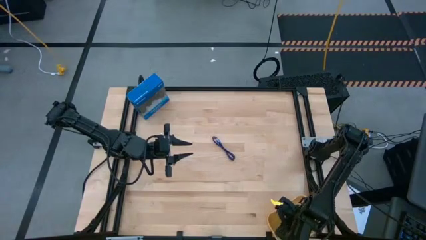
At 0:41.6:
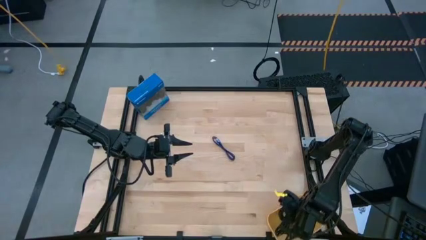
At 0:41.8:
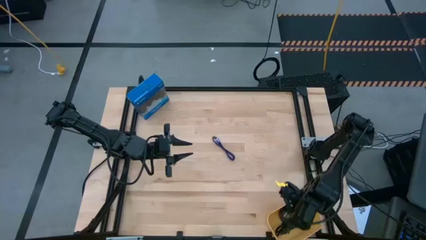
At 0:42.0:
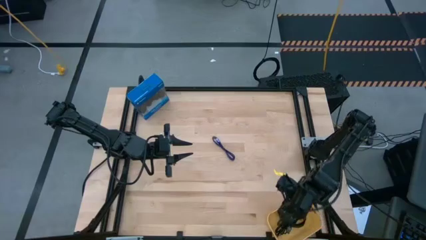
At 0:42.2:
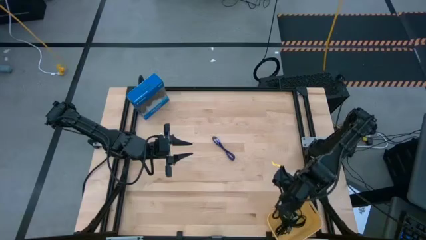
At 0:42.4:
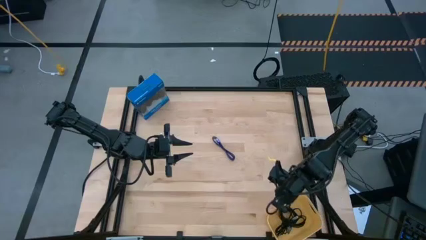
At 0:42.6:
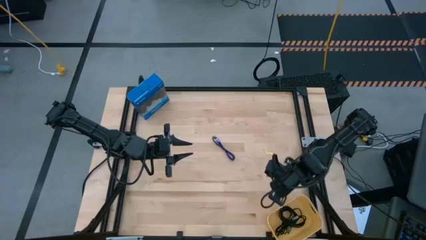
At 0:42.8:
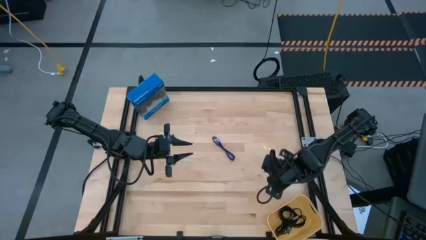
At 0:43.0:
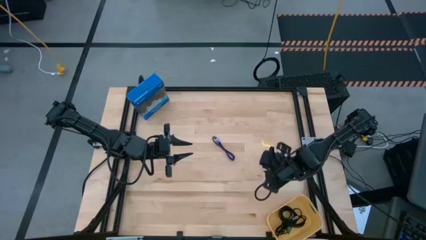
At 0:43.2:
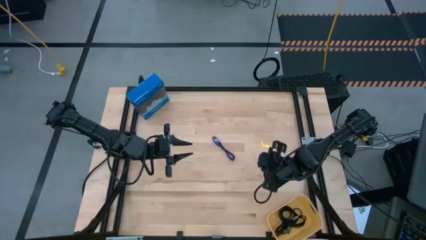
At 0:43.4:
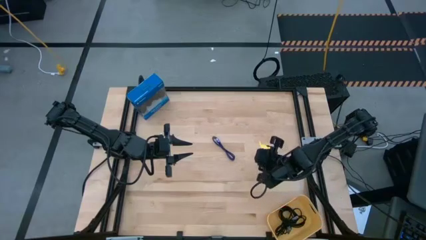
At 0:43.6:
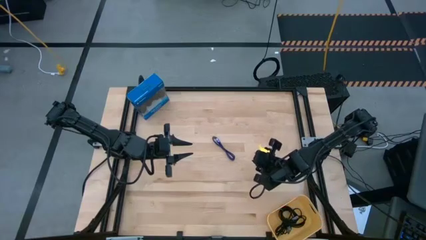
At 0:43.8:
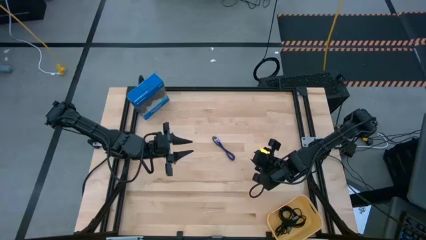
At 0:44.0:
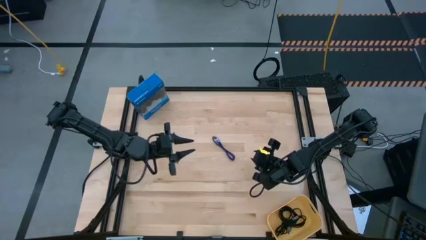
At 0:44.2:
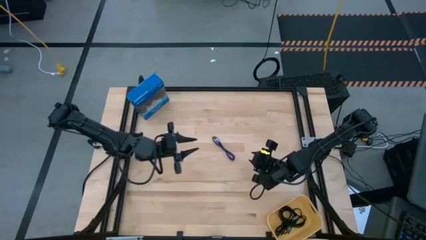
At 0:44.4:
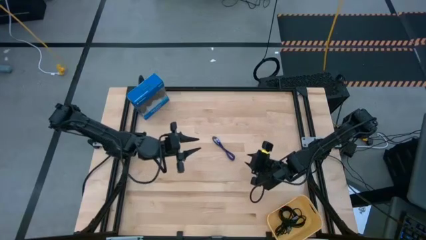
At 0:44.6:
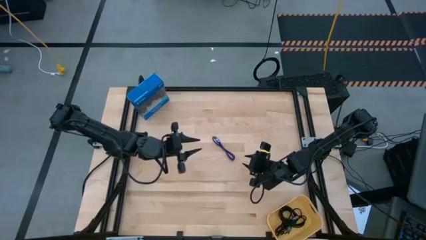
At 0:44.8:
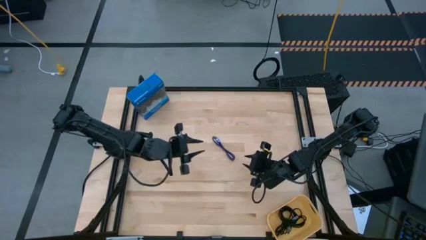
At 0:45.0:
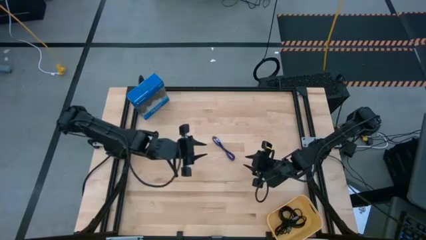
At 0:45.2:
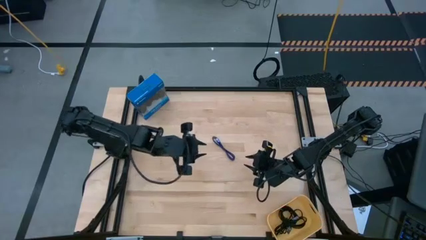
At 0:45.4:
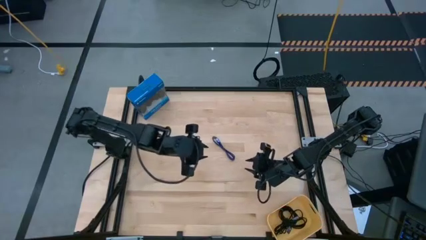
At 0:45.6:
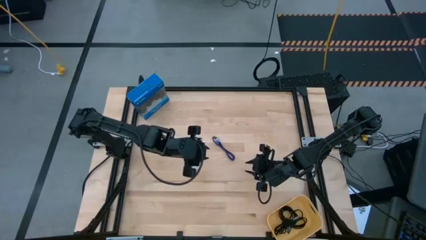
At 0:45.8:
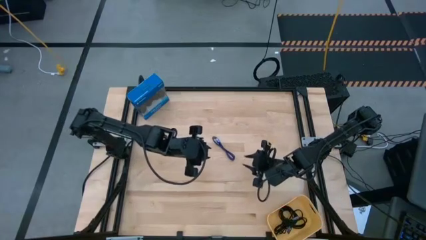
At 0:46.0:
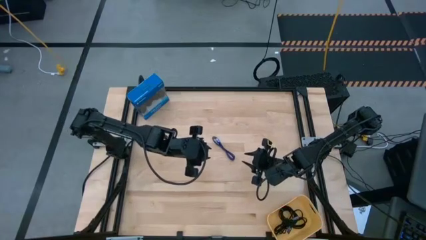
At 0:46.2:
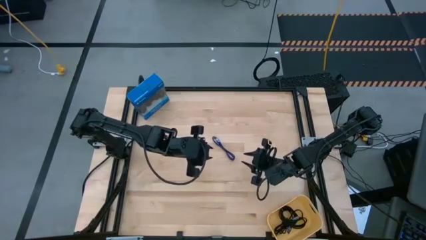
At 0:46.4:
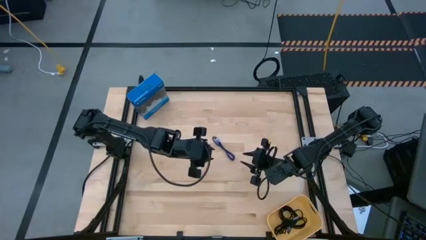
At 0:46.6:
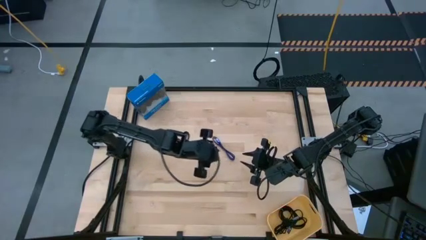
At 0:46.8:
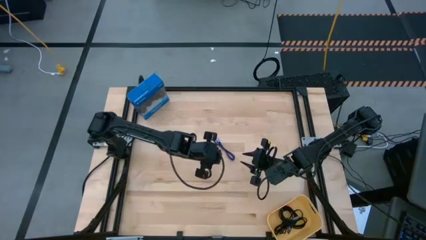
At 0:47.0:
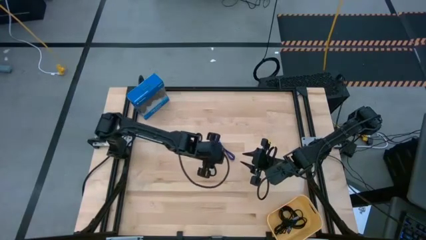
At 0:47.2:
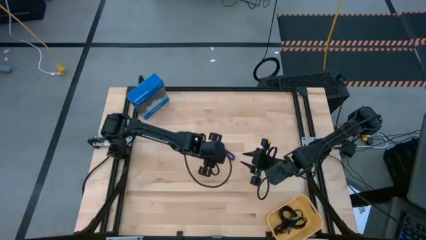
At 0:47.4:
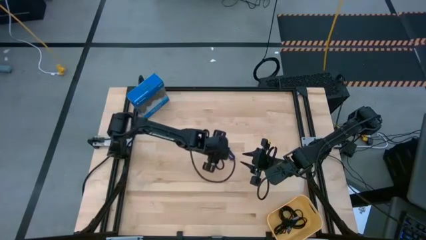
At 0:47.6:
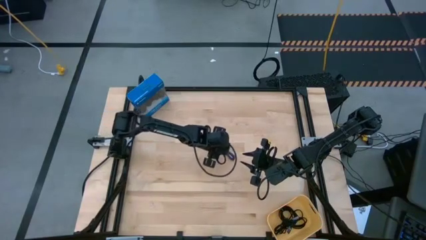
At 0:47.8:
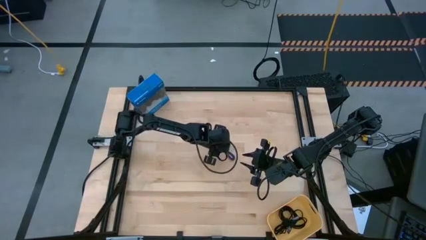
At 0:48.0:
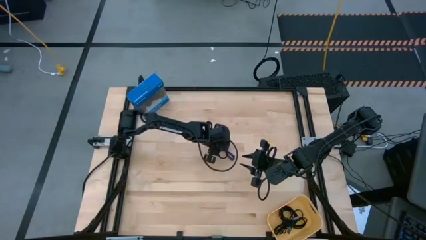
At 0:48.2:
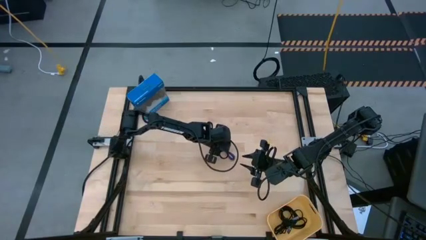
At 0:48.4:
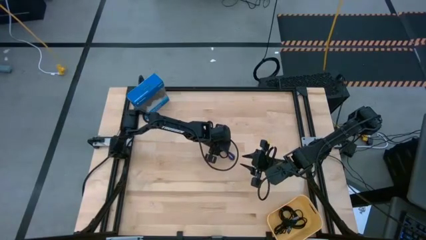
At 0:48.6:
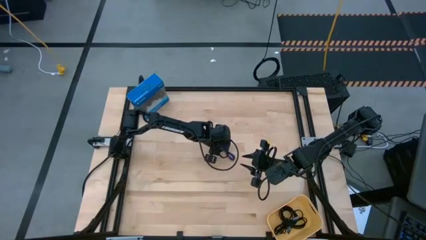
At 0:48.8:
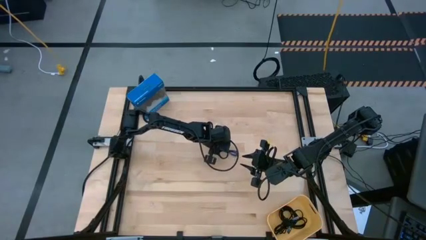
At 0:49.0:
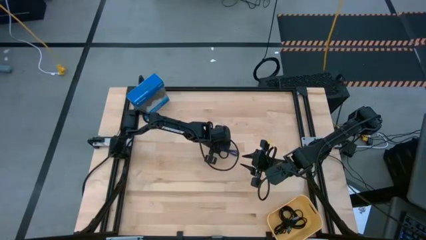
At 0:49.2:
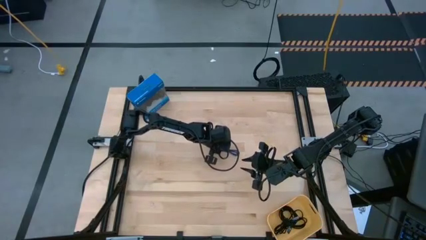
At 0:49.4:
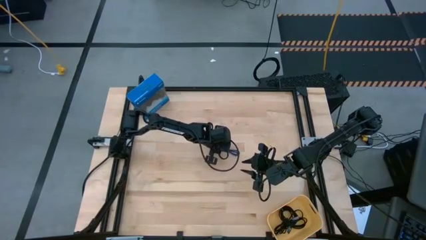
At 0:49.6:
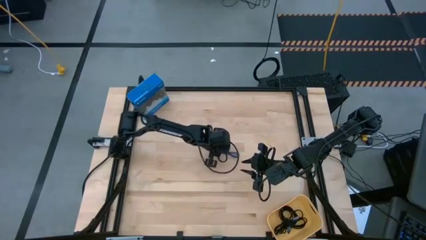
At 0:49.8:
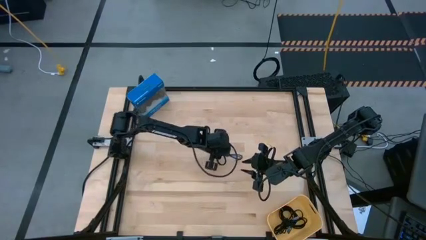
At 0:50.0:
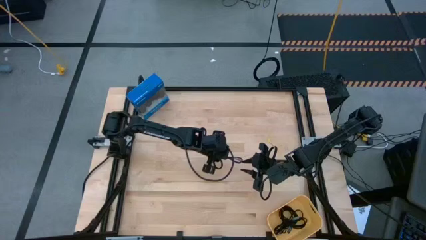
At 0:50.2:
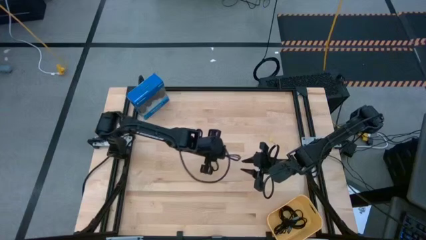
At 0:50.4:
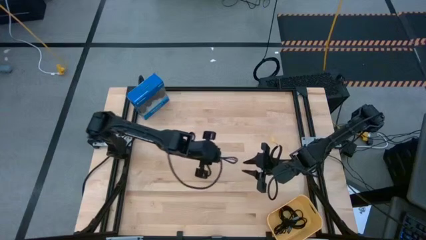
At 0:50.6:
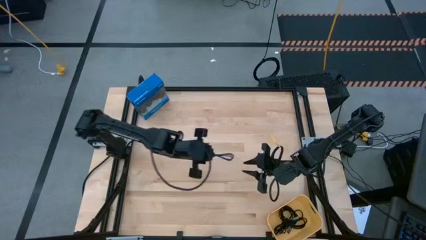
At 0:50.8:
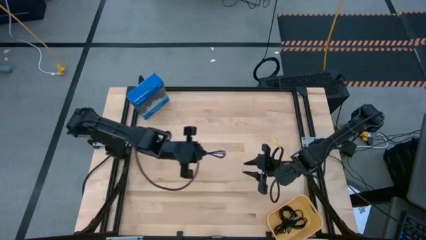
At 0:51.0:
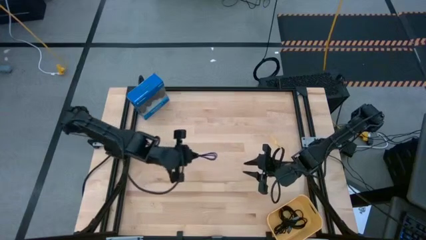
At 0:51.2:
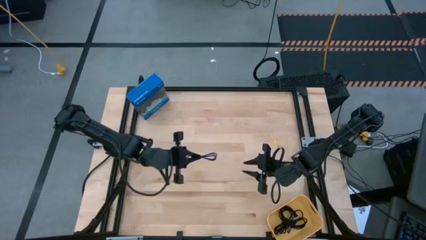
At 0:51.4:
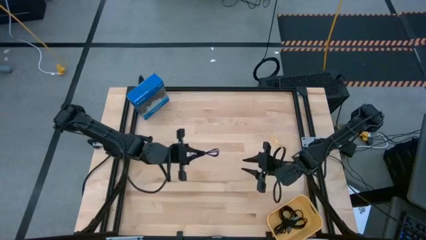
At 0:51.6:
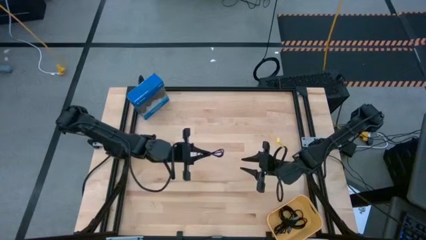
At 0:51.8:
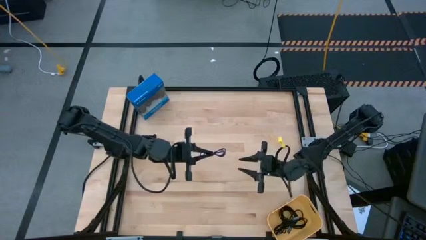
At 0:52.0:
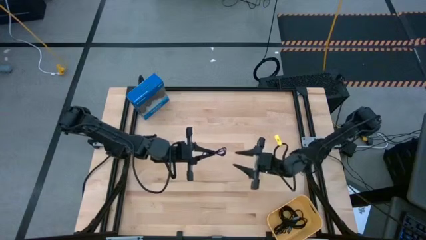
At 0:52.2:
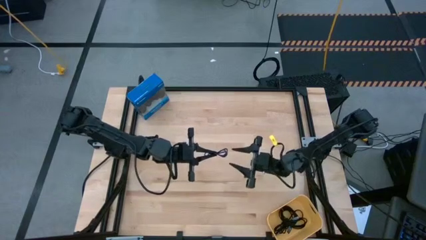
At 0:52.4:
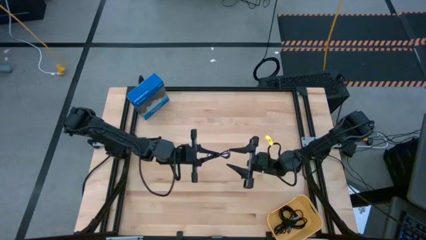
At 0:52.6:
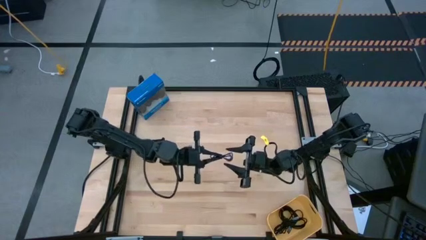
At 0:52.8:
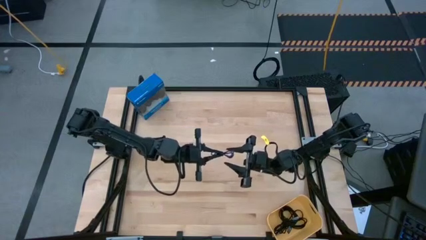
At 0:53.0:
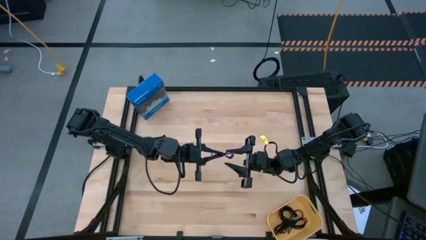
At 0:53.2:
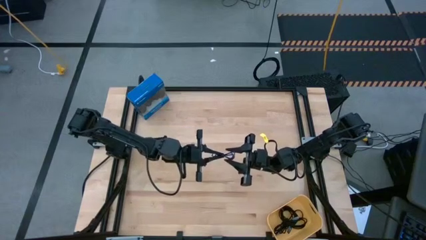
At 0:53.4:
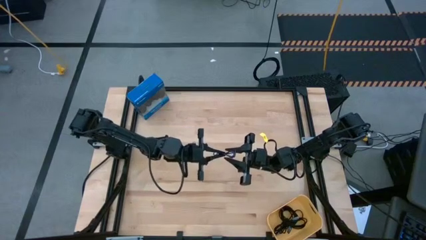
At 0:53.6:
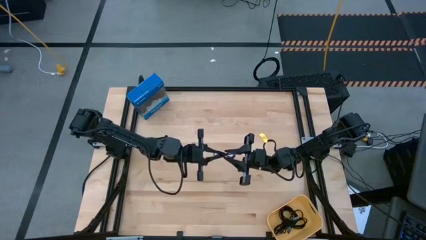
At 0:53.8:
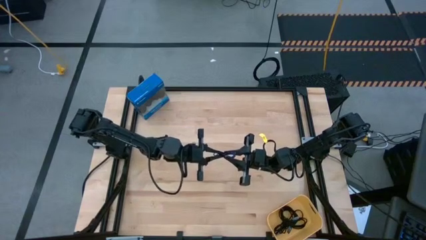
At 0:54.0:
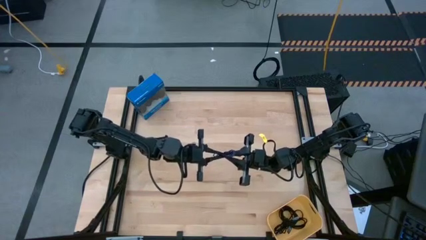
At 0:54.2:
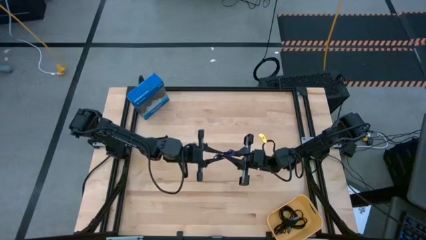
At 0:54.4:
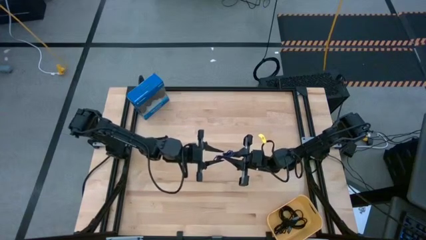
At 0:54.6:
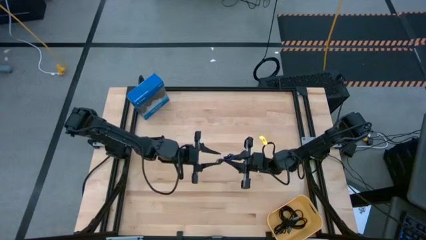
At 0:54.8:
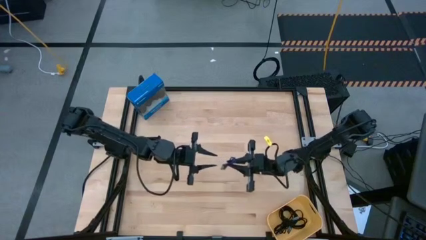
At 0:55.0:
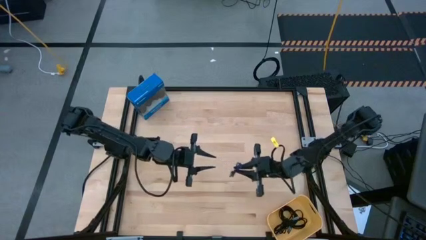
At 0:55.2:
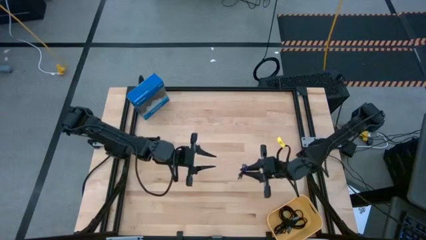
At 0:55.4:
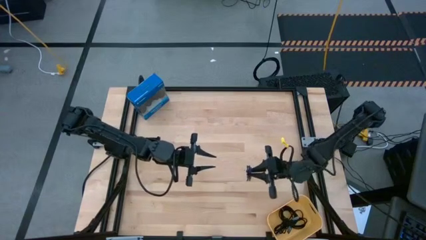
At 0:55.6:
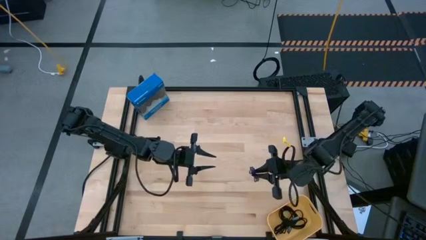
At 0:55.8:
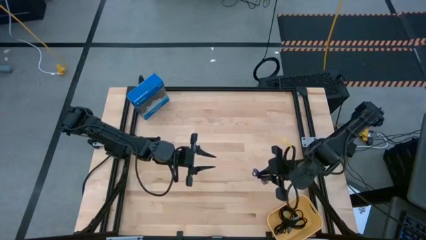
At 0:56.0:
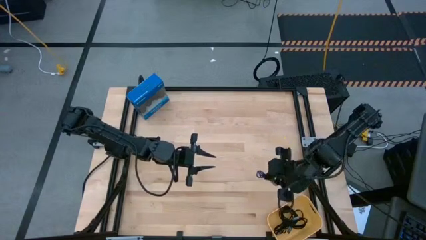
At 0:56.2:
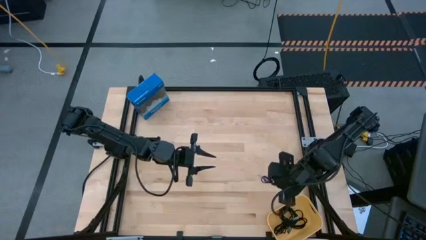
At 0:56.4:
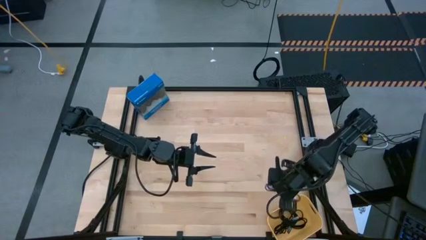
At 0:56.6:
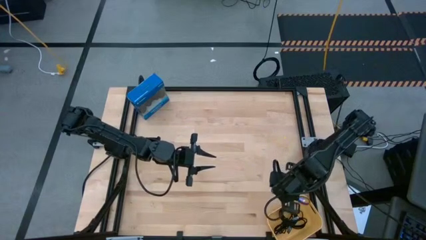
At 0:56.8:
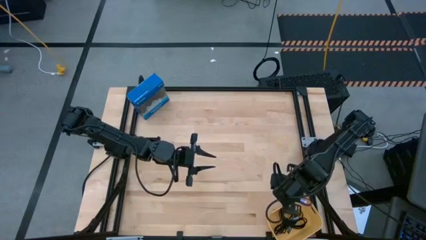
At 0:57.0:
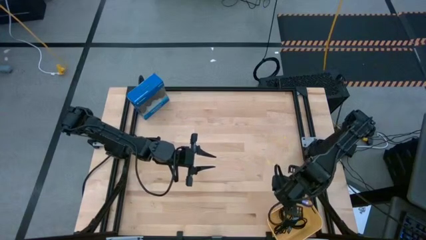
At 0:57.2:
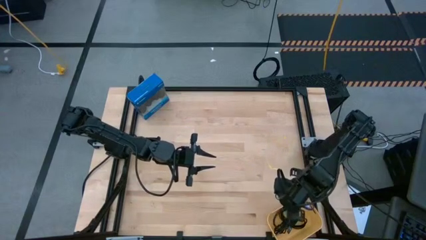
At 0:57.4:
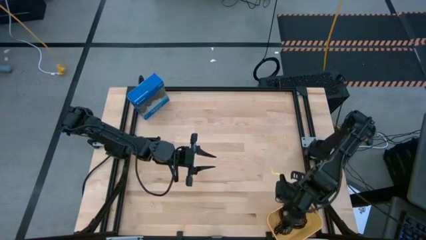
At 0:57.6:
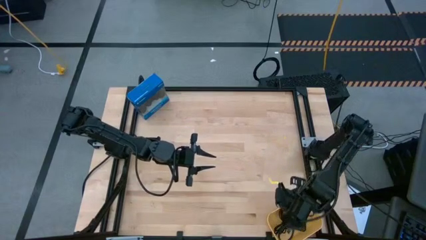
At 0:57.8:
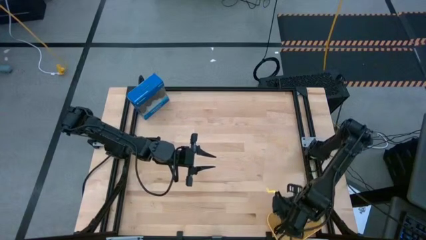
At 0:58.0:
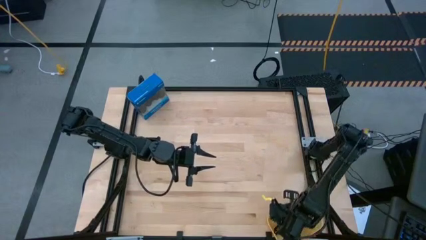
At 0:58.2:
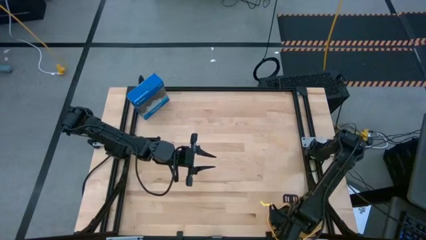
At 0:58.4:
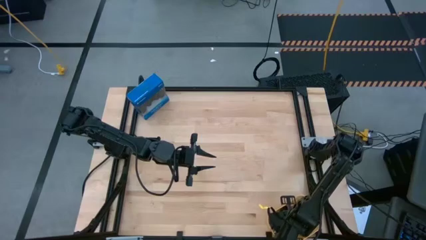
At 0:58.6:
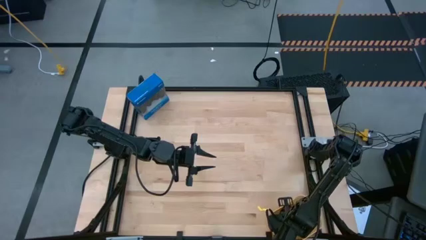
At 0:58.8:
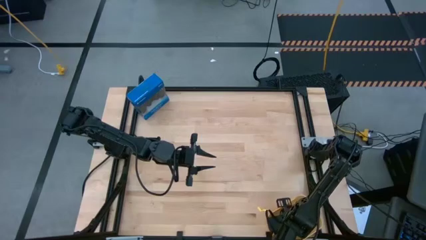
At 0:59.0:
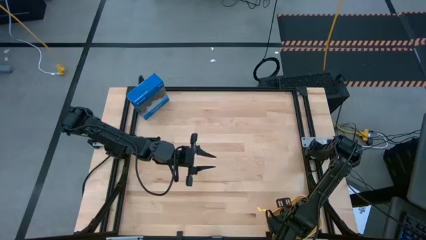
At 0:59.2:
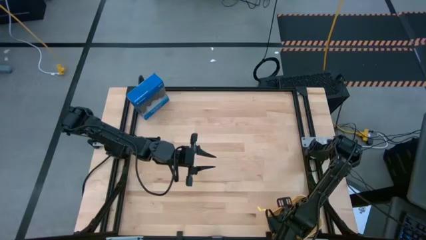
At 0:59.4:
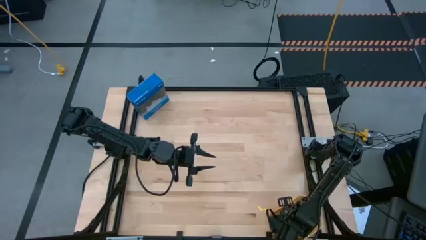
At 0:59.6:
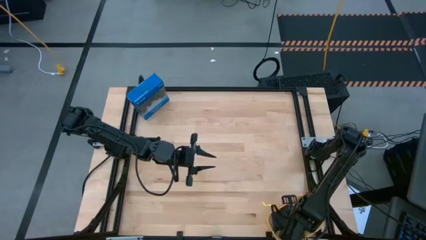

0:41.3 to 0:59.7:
Task: Pick and place USB-C Cables
Put the blue charger cable into the yellow bin
